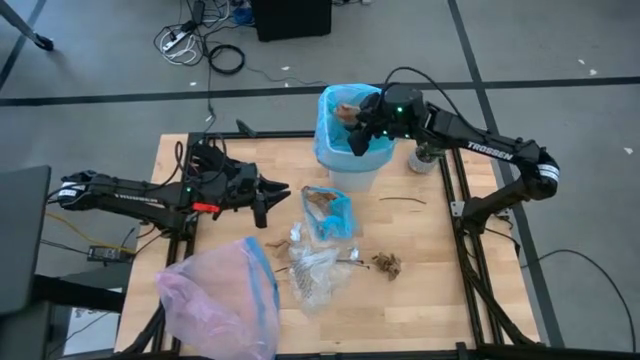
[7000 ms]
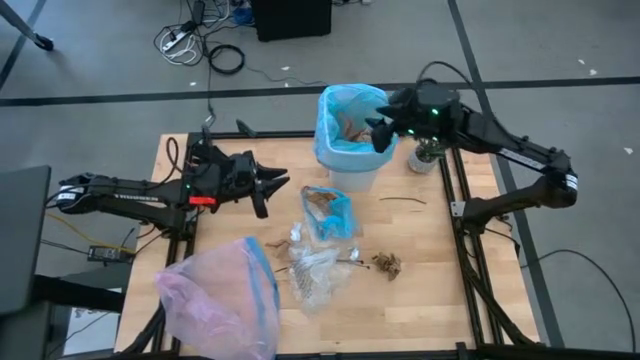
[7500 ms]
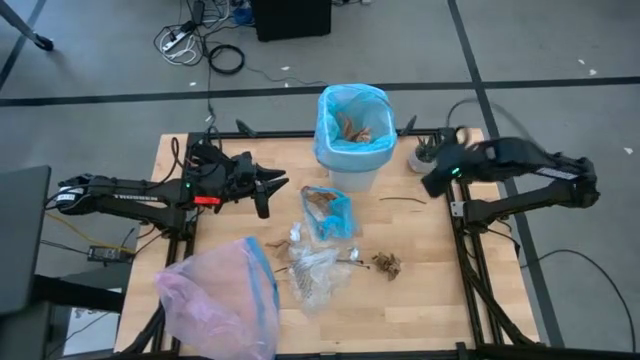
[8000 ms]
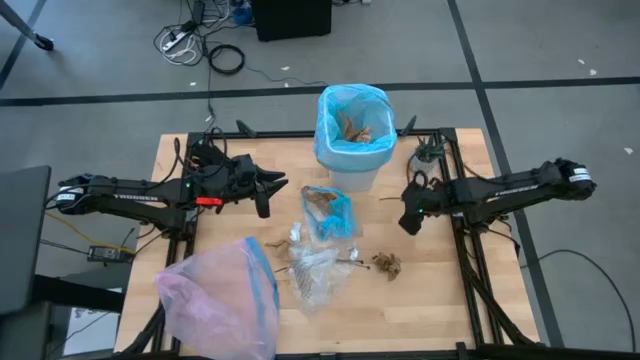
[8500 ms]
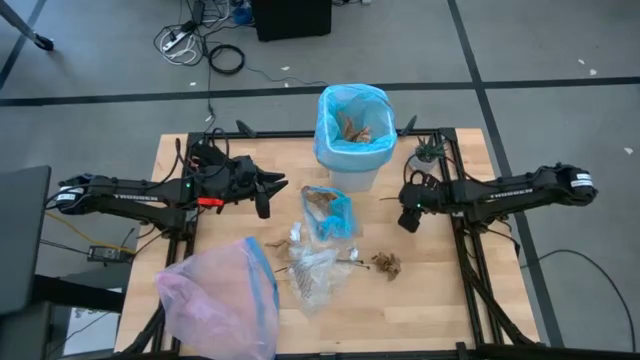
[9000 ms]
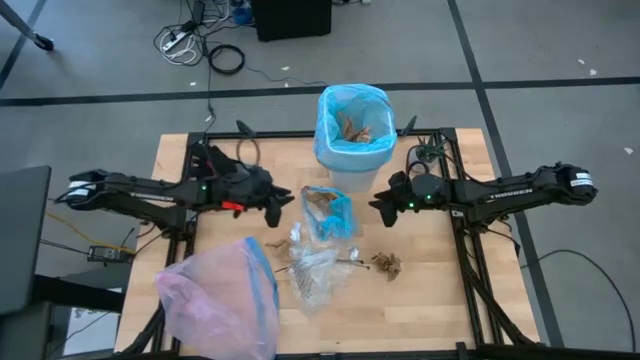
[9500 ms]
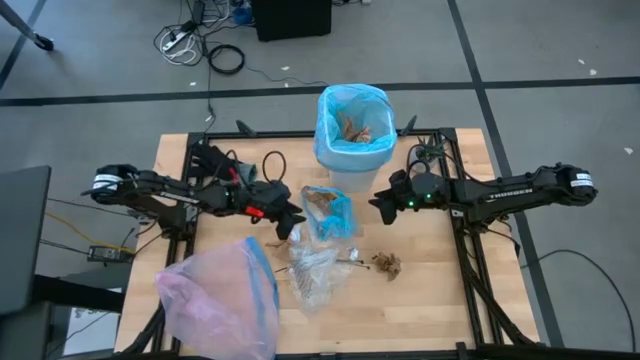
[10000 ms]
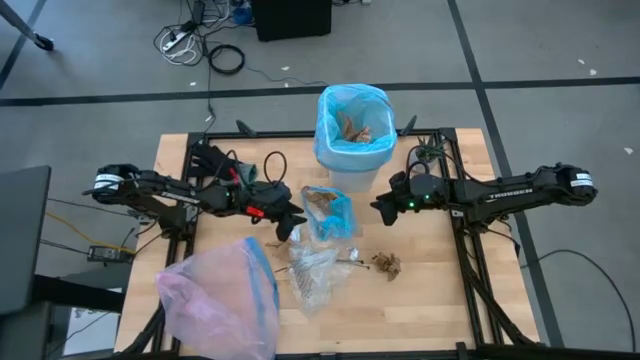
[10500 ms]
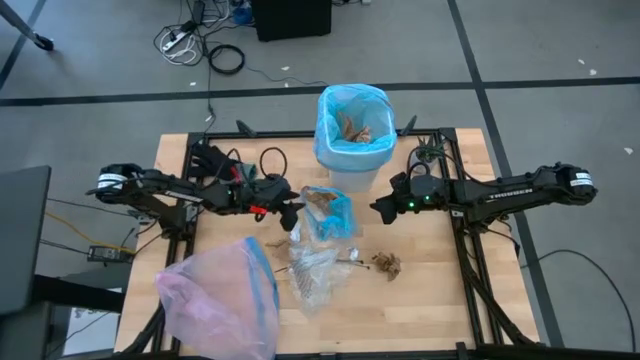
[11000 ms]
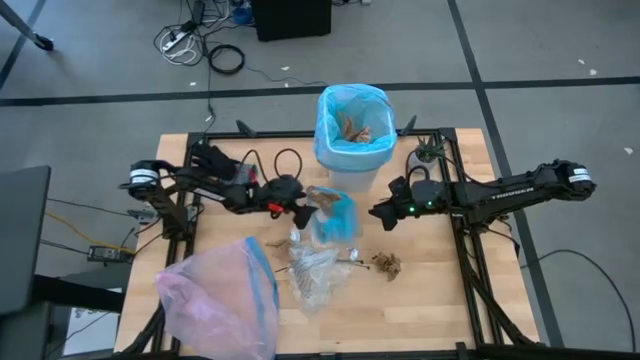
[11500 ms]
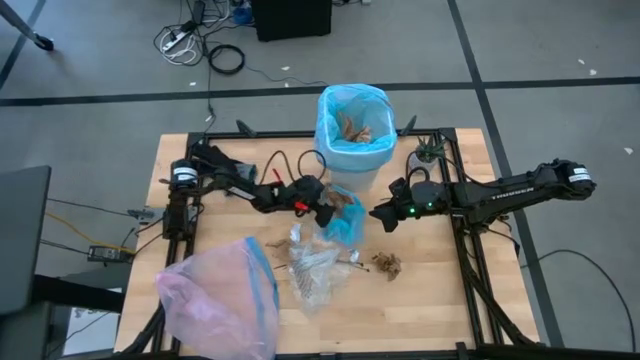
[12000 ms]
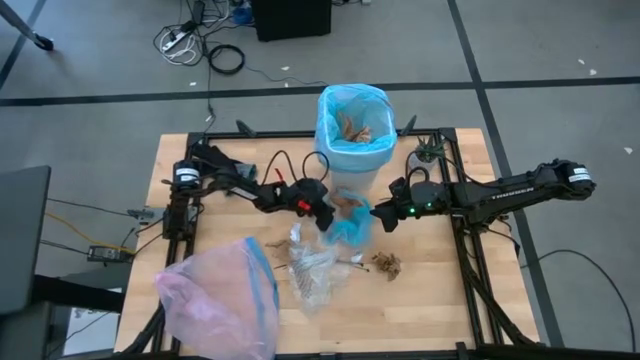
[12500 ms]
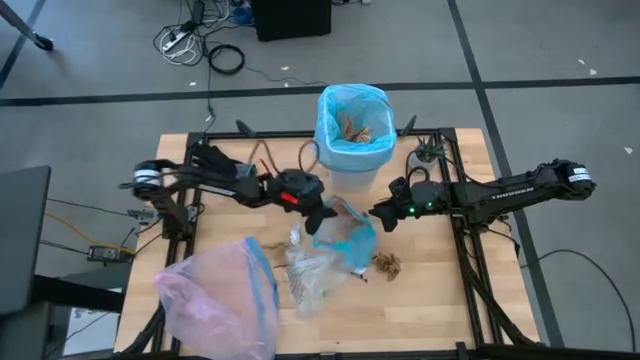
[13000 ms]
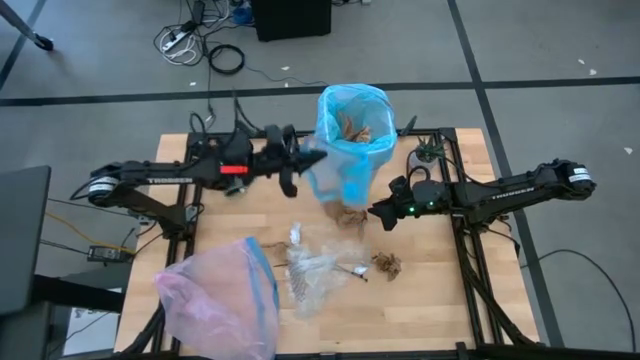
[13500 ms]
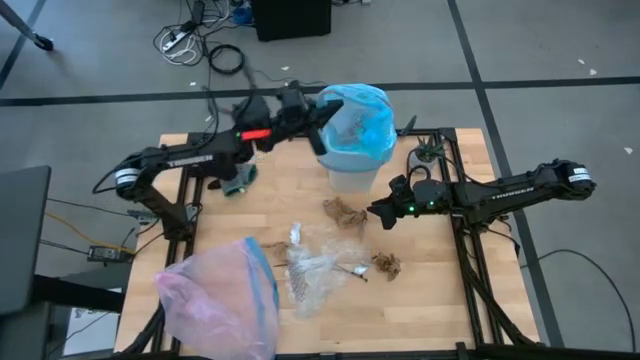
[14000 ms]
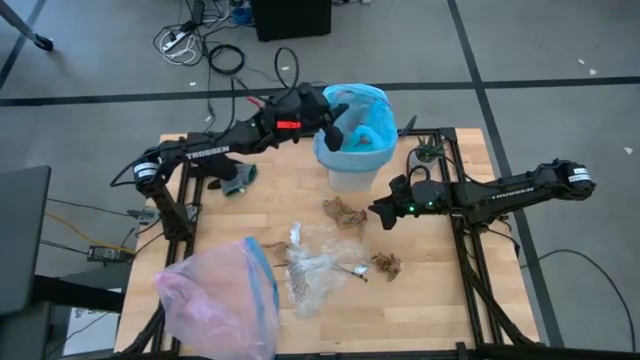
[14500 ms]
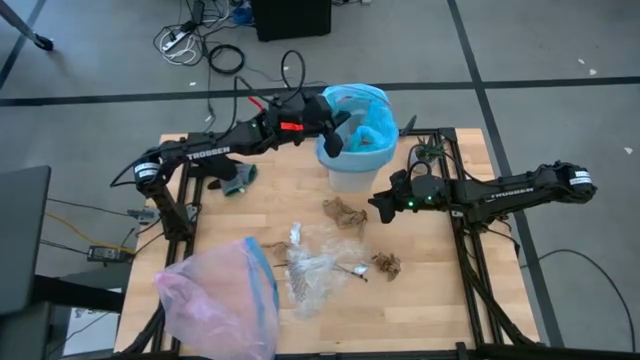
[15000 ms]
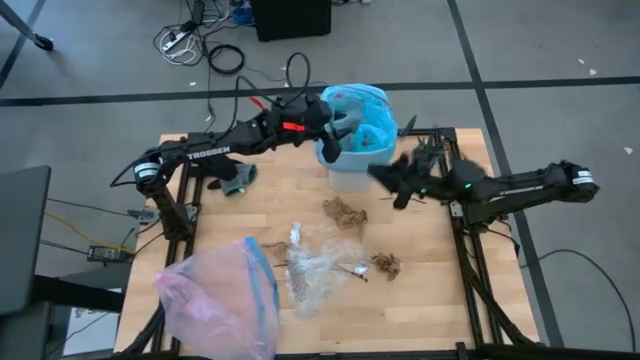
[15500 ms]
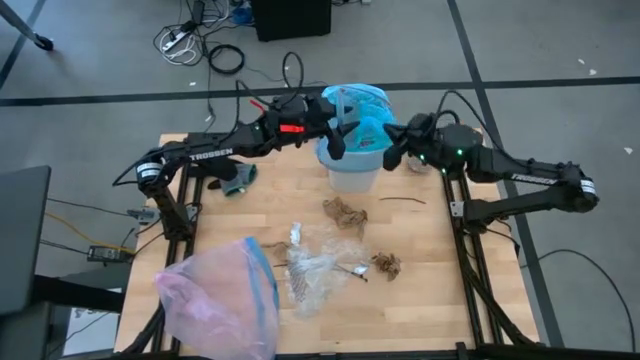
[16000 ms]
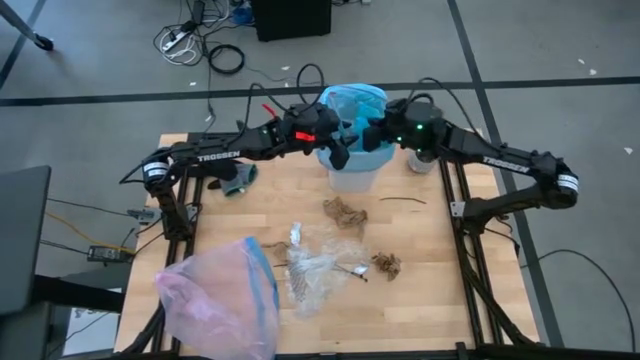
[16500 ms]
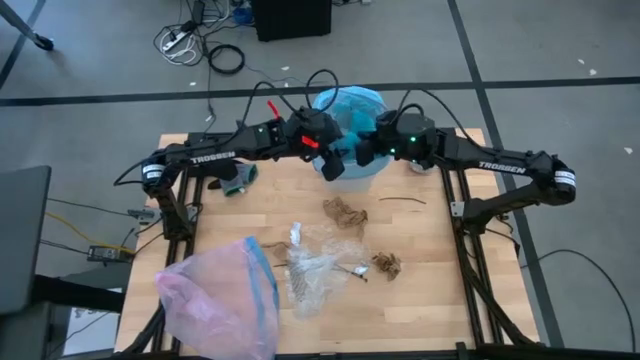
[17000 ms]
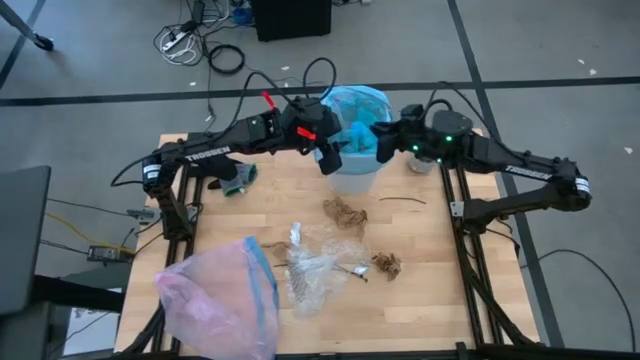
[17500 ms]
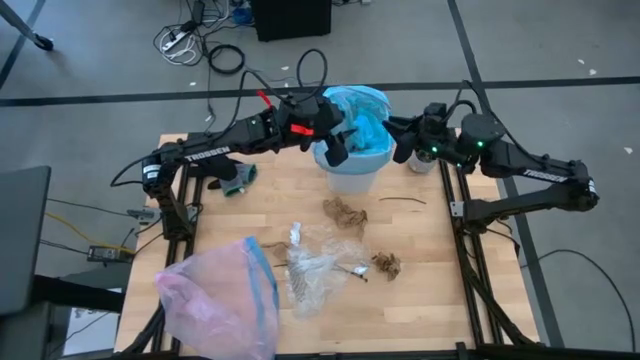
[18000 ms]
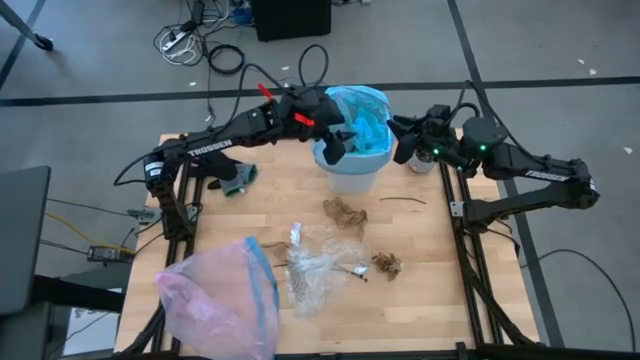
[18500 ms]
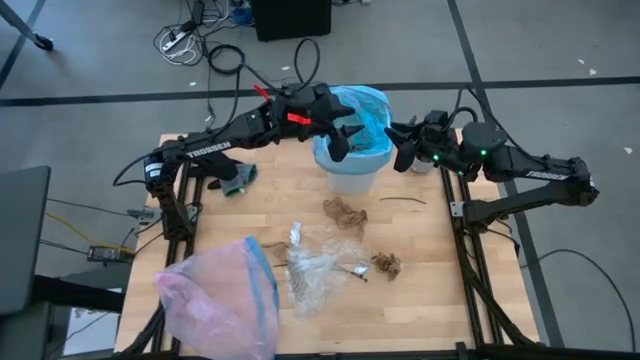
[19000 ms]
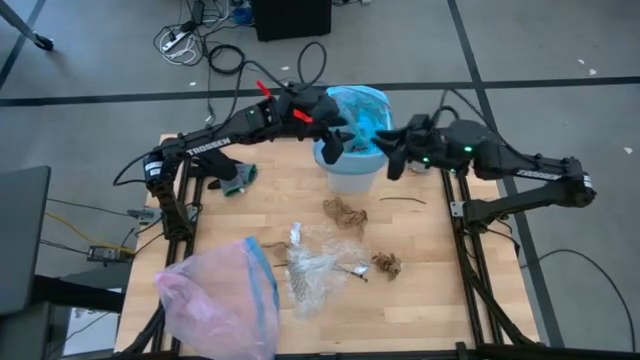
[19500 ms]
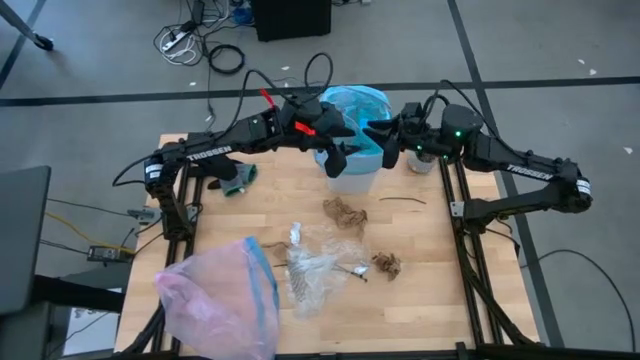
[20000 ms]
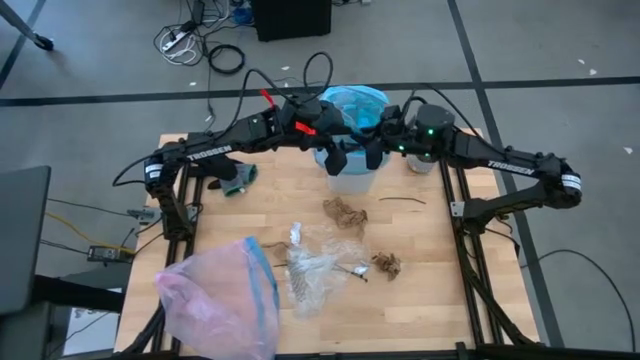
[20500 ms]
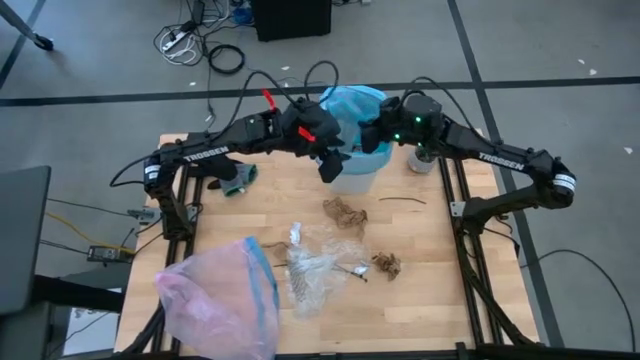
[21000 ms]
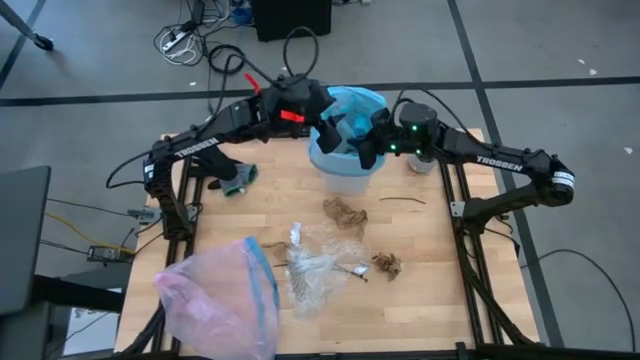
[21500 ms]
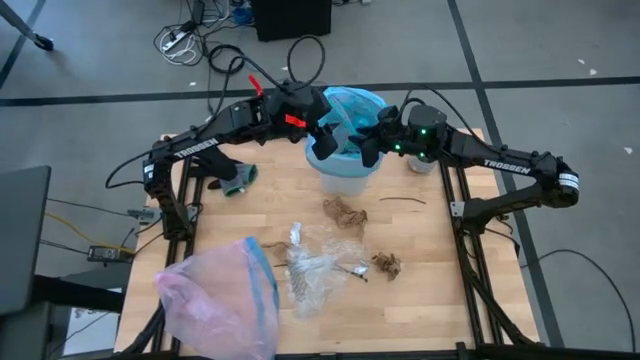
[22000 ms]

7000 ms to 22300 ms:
Task: place trash/remove bag and relplace
Put the blue plastic into the trash bin

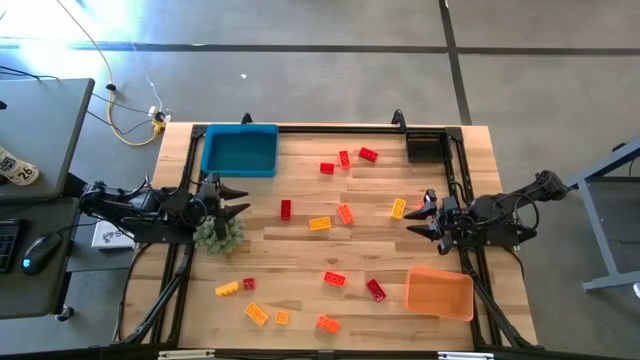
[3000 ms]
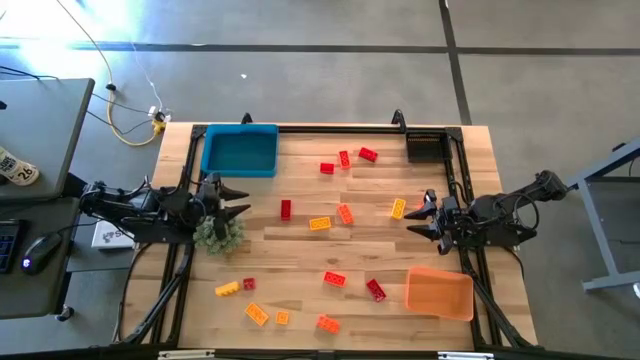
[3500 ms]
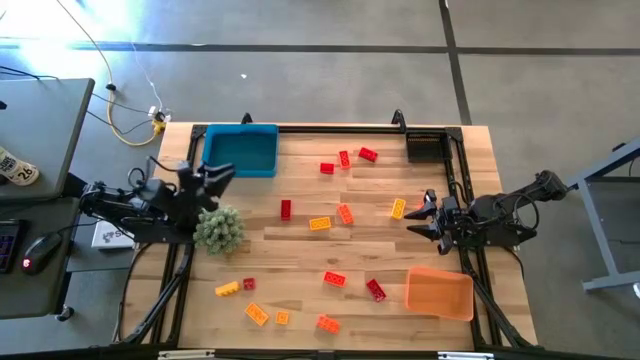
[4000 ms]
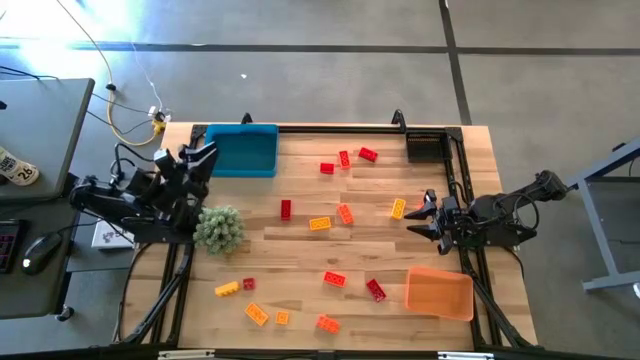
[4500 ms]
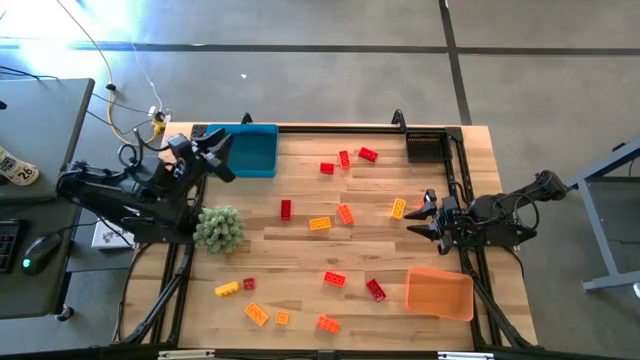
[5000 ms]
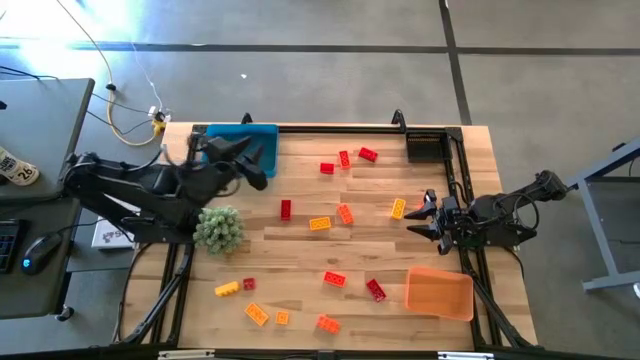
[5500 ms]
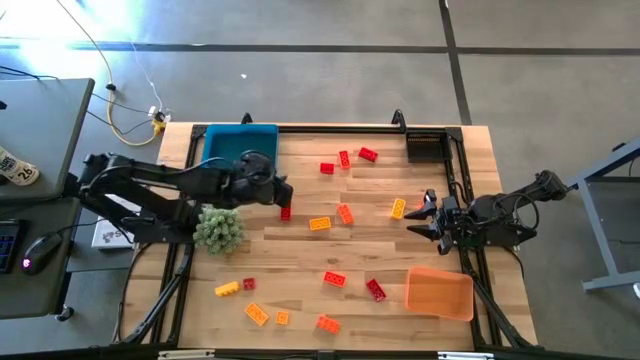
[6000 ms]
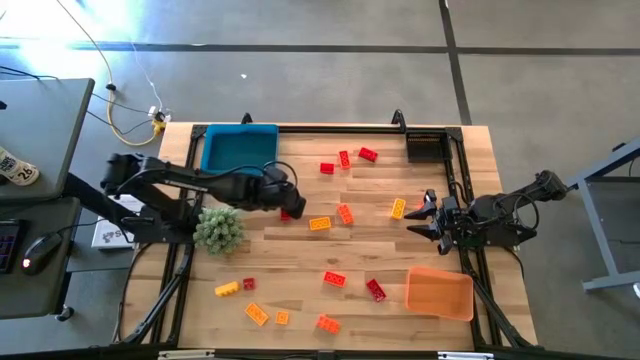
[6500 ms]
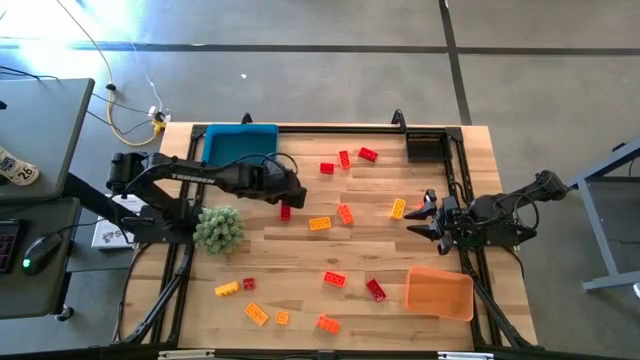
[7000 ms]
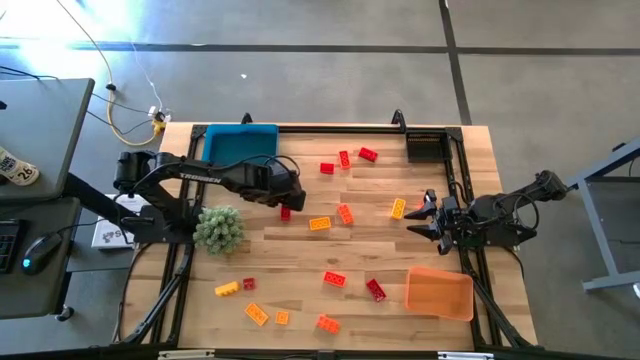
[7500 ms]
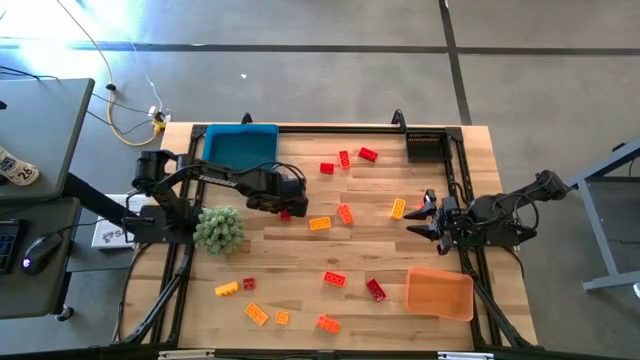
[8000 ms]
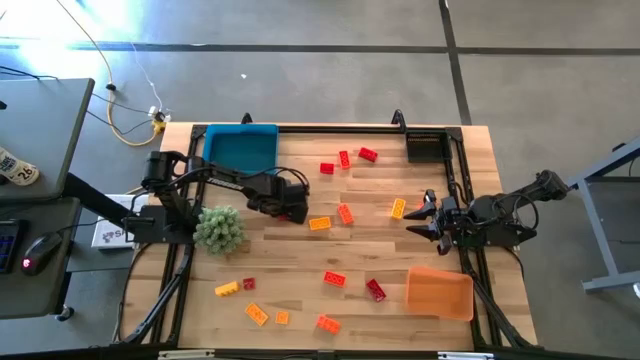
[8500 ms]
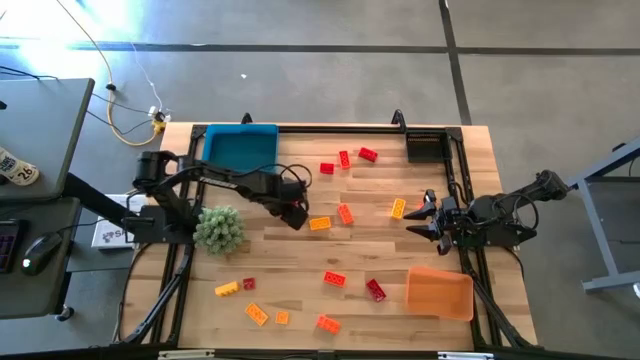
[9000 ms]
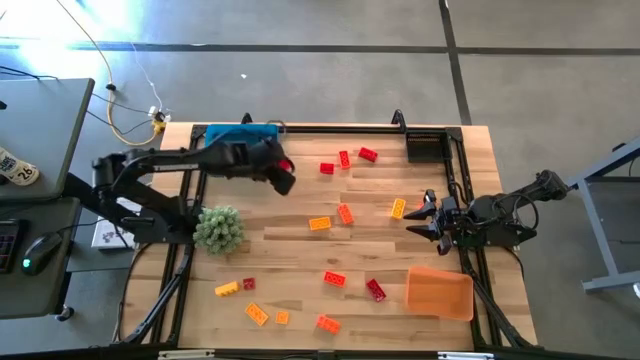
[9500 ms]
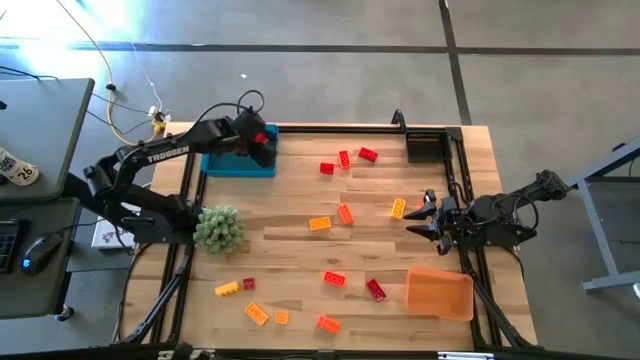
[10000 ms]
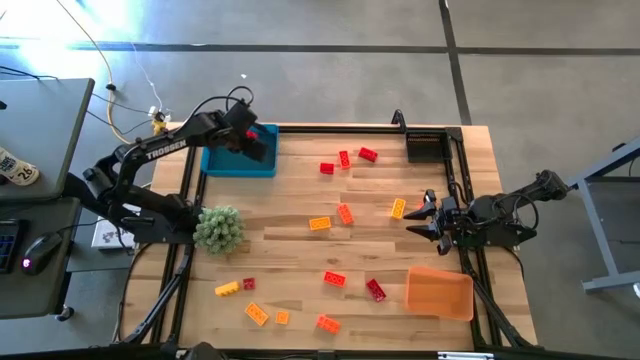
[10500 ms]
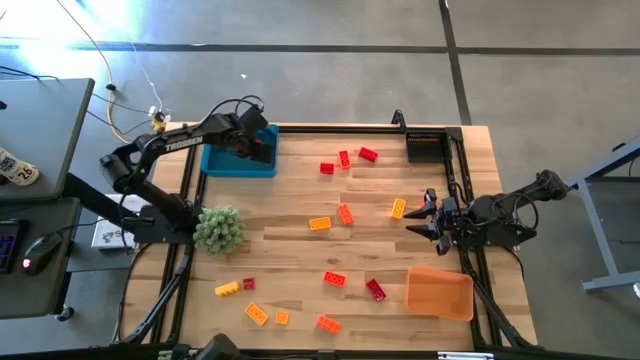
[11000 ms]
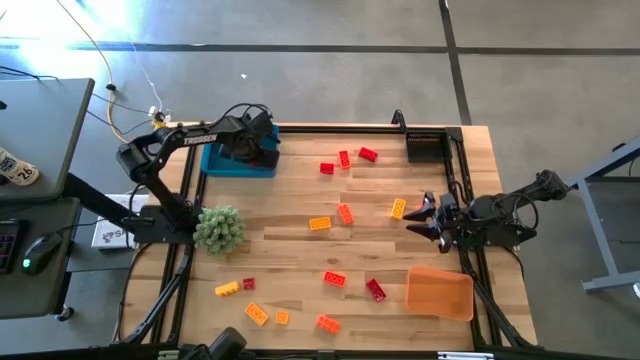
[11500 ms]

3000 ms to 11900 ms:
Task: Sort & place blocks by color
Put the red game piece into the blue bin
